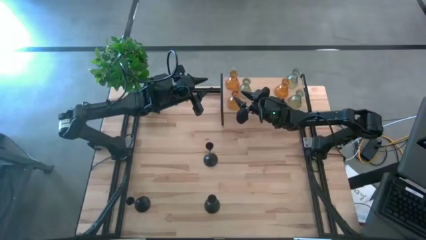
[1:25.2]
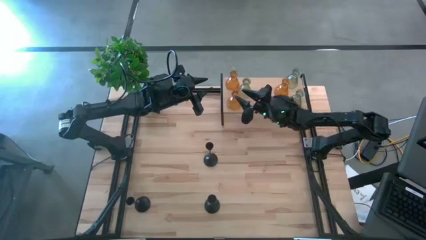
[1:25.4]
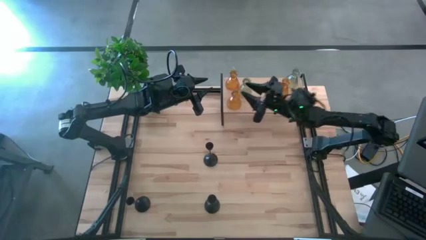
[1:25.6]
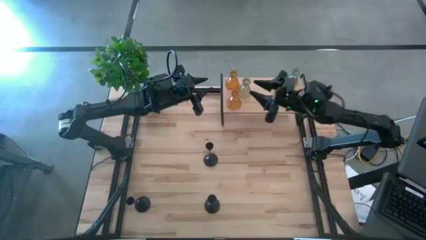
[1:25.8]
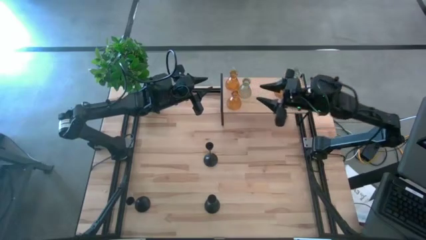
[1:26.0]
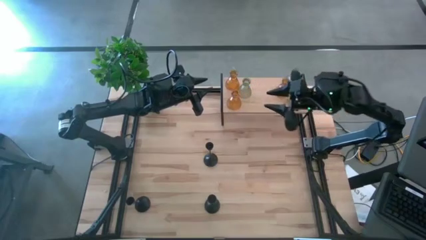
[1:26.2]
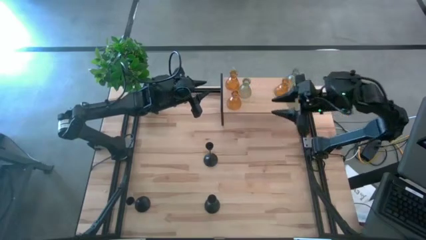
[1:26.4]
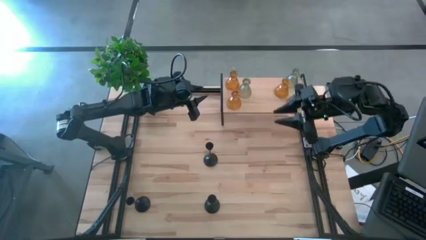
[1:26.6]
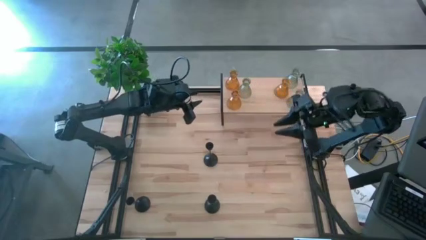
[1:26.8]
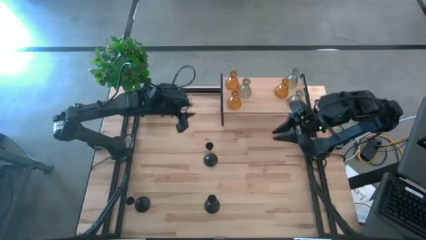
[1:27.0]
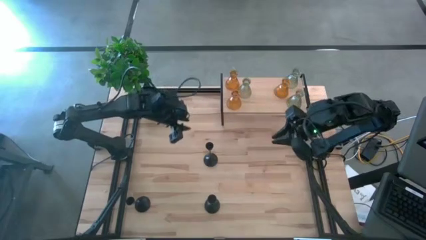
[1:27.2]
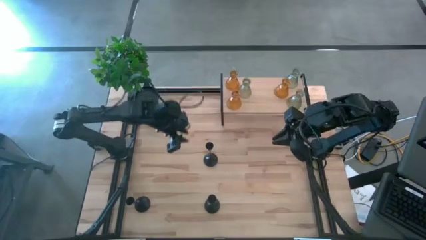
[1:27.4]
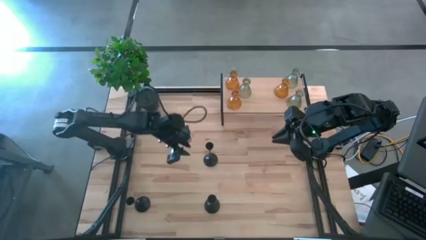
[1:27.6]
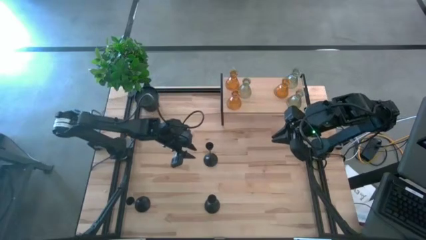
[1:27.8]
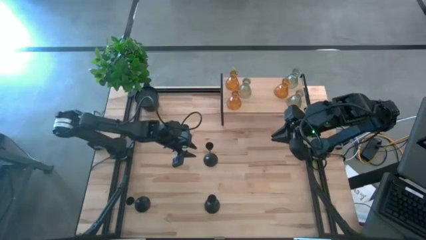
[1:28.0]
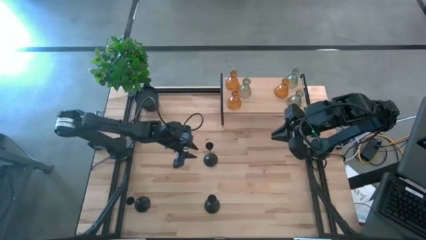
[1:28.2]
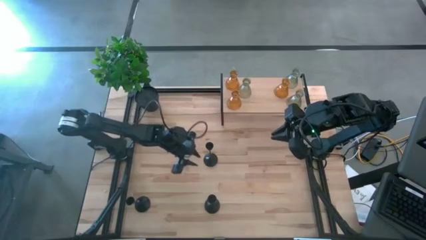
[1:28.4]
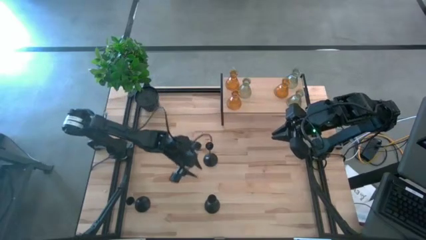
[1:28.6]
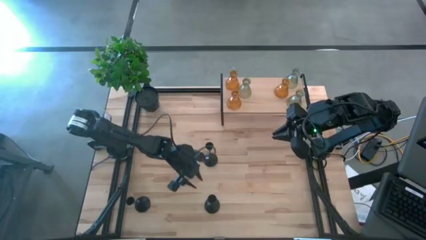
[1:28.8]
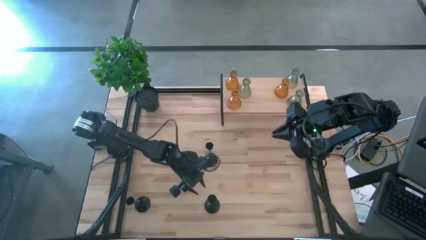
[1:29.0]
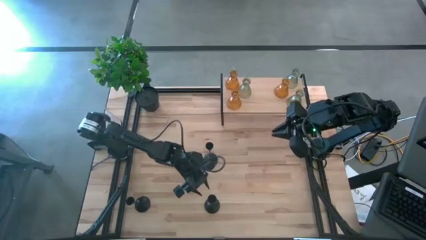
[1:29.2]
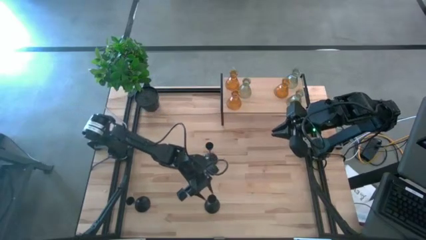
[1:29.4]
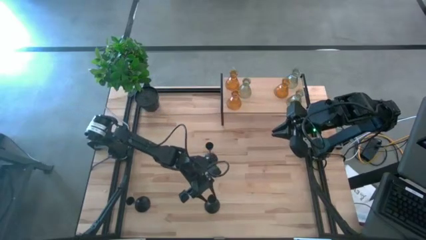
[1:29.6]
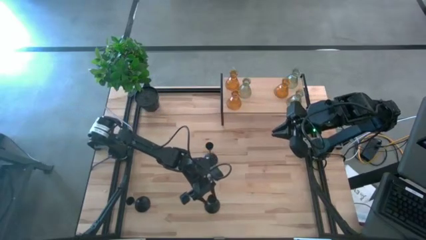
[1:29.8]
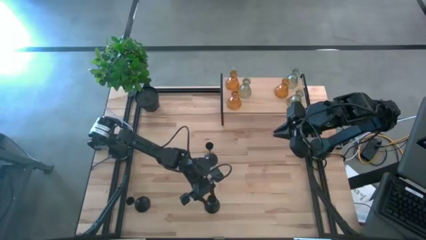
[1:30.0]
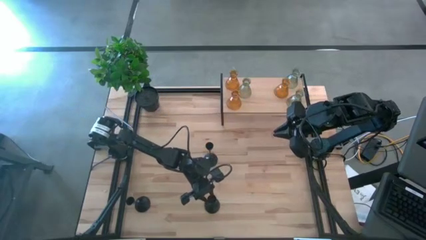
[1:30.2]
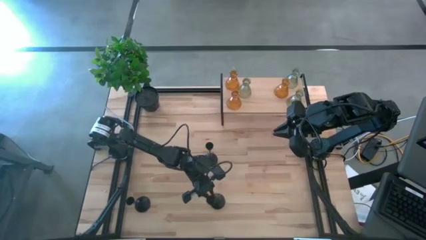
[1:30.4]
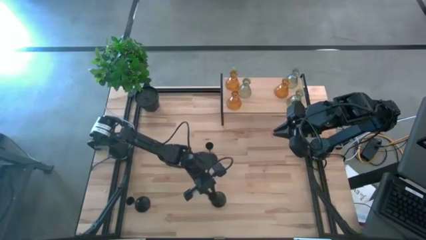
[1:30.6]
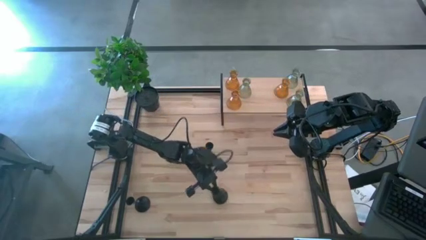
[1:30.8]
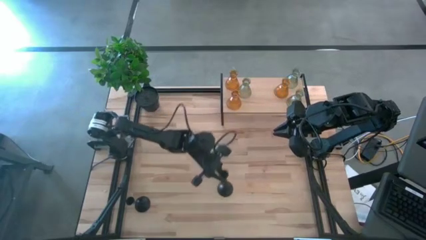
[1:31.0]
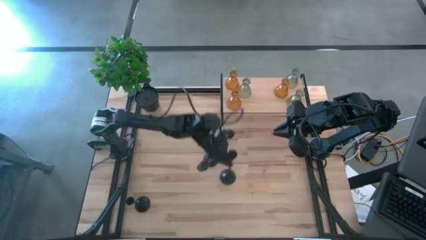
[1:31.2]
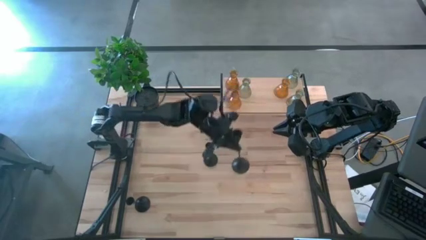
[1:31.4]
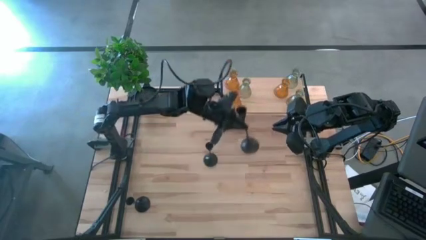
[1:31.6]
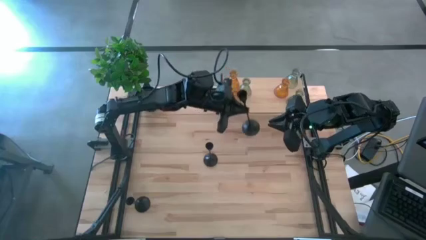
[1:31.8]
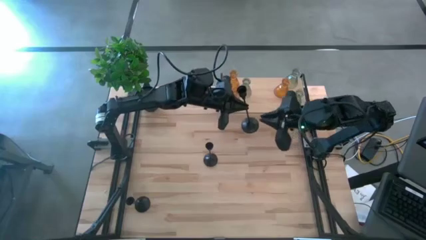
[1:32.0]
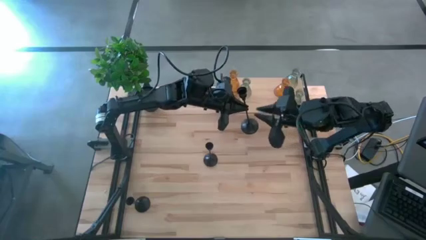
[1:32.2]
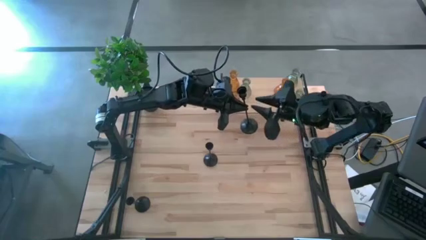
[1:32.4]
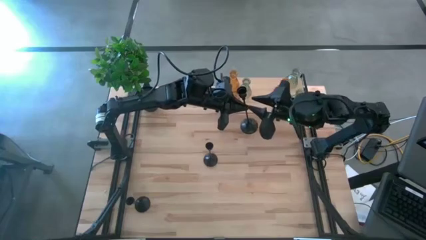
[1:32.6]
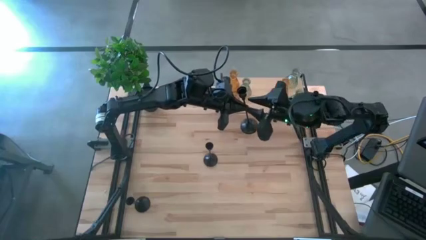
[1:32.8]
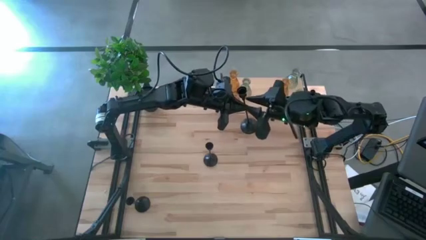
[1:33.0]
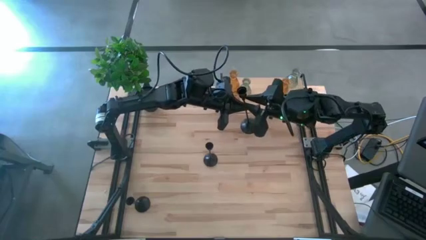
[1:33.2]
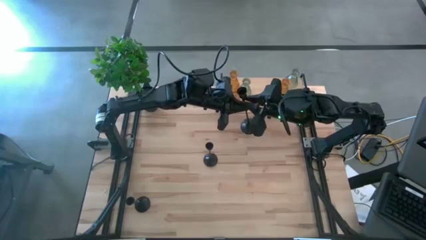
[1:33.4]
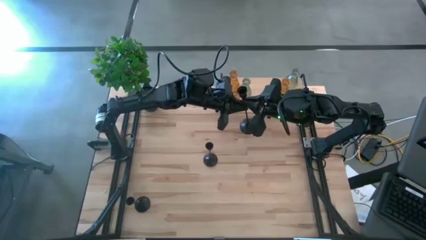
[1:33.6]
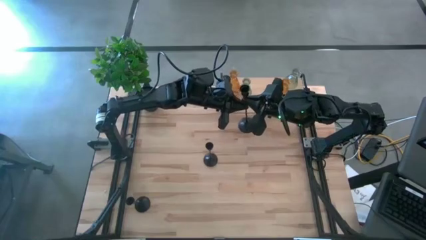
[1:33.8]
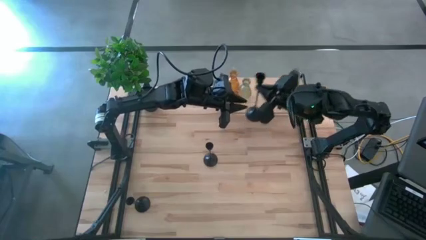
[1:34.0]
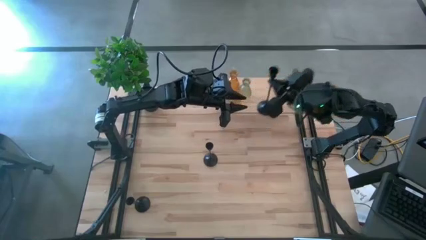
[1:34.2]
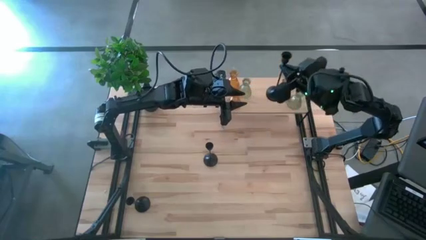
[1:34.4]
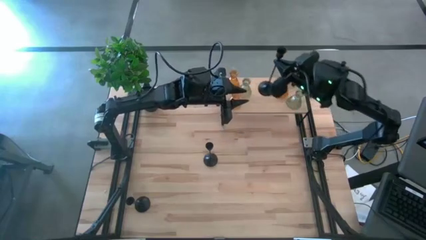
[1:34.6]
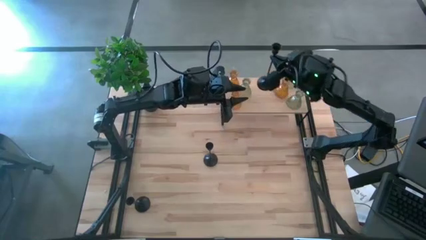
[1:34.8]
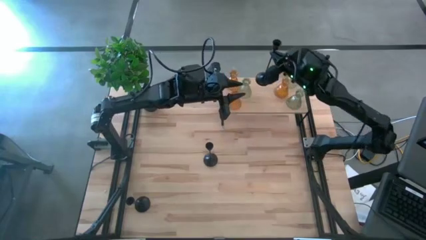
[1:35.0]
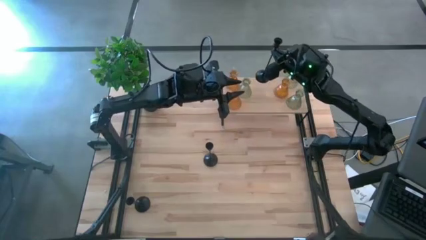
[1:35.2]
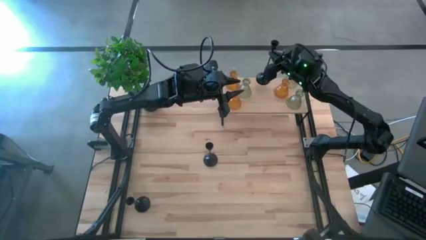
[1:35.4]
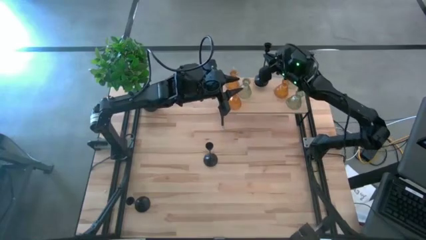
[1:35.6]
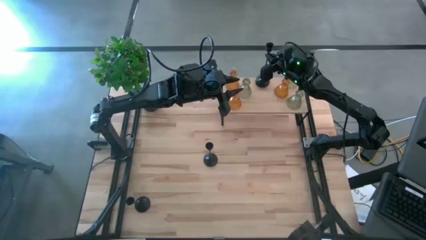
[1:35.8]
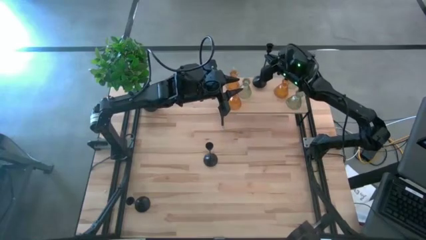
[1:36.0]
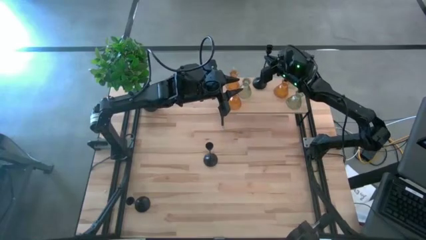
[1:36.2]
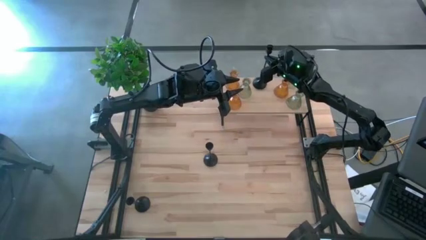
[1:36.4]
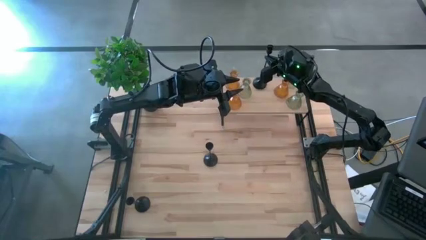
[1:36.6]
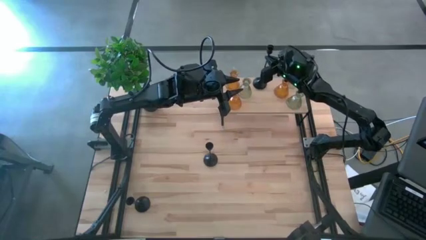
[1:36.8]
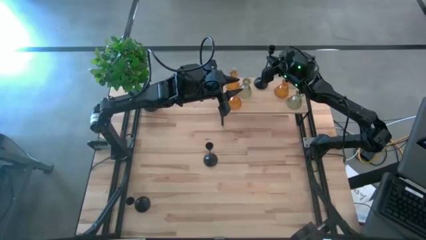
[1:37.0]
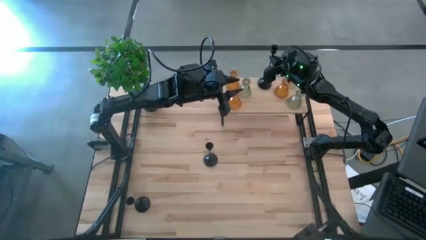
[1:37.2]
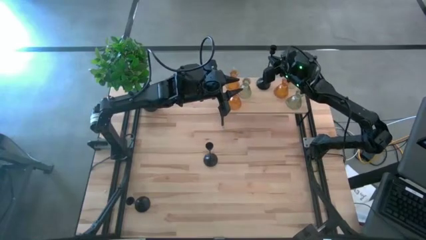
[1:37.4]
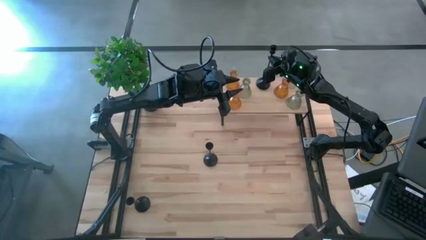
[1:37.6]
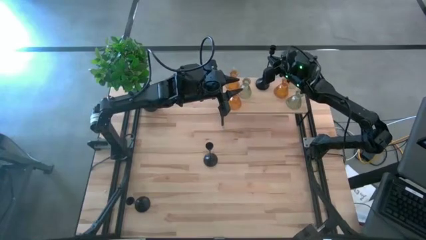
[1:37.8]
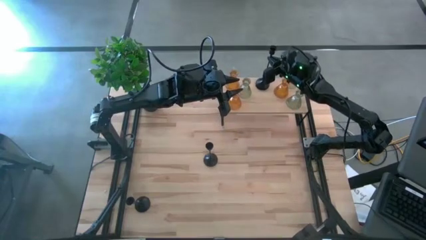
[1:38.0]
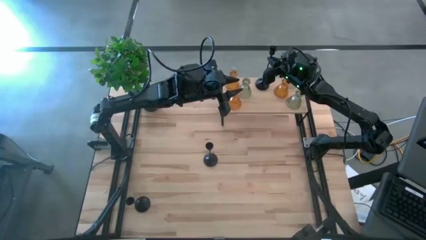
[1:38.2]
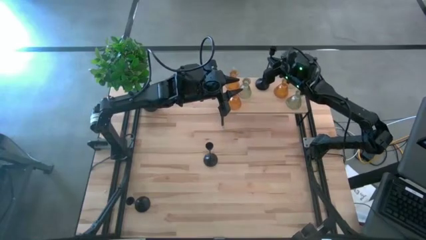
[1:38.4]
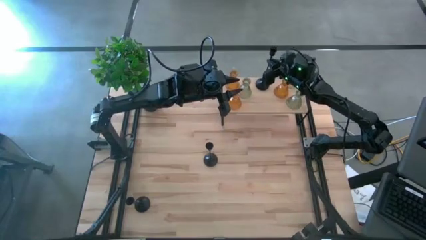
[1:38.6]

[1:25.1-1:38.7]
Task: Pick & Place candle stick holders
Put the bottom right black candle holder on the shelf

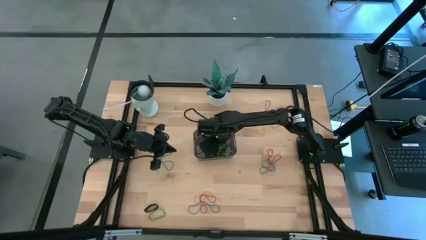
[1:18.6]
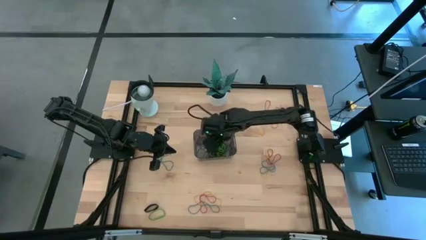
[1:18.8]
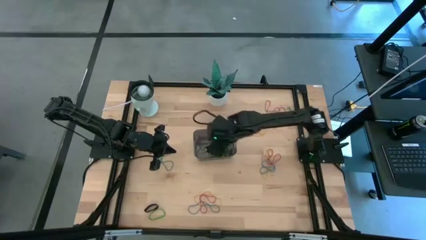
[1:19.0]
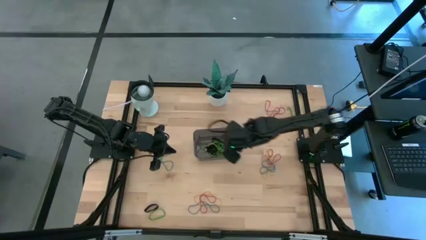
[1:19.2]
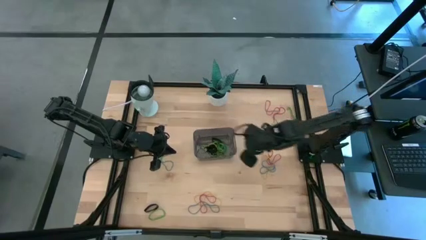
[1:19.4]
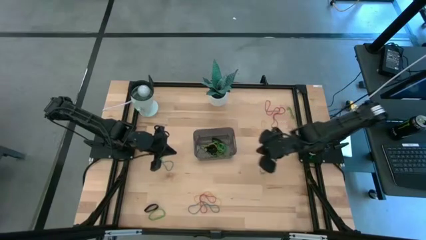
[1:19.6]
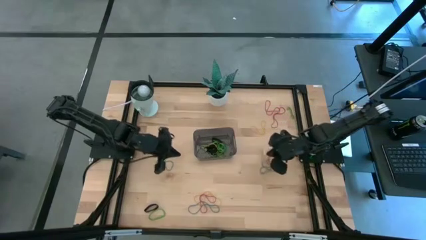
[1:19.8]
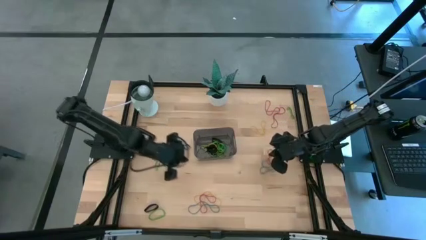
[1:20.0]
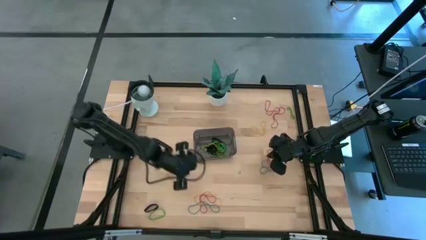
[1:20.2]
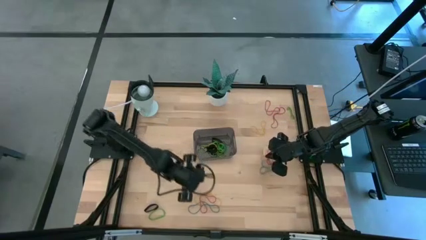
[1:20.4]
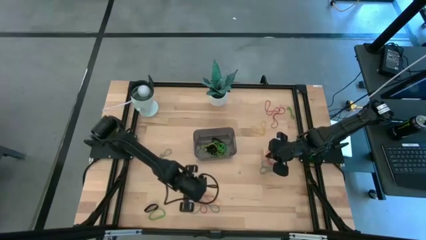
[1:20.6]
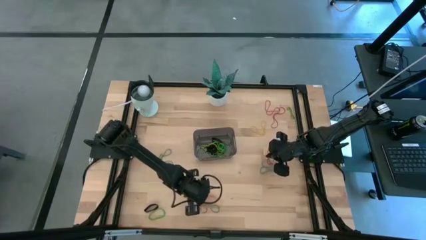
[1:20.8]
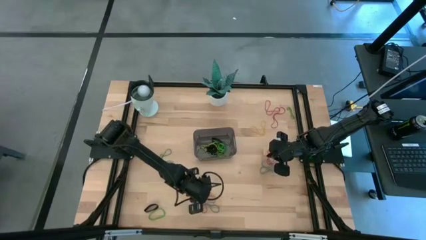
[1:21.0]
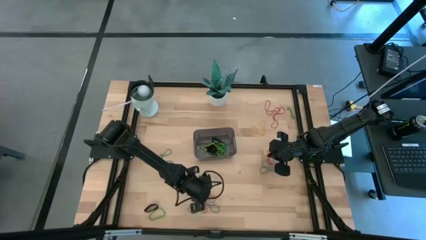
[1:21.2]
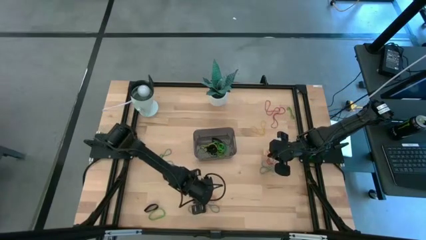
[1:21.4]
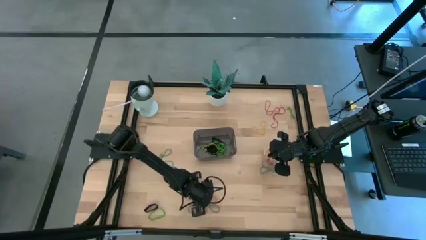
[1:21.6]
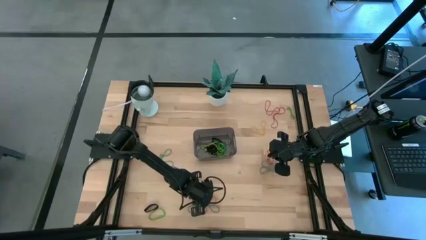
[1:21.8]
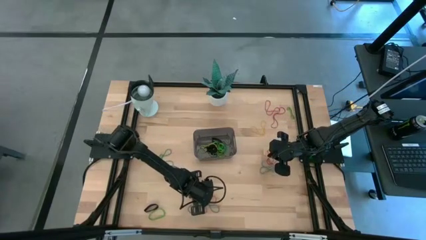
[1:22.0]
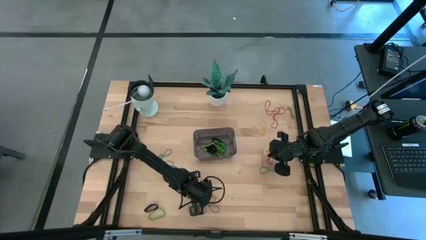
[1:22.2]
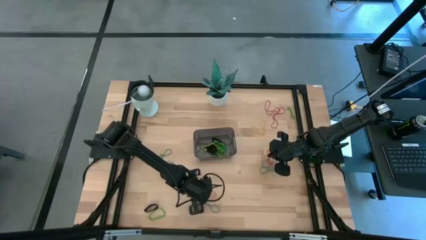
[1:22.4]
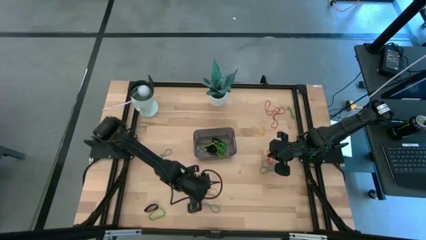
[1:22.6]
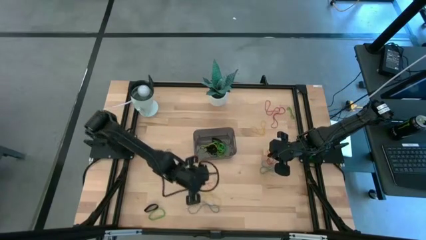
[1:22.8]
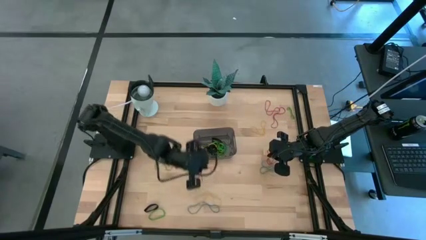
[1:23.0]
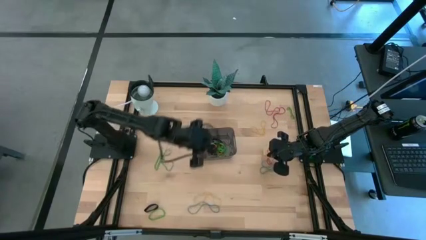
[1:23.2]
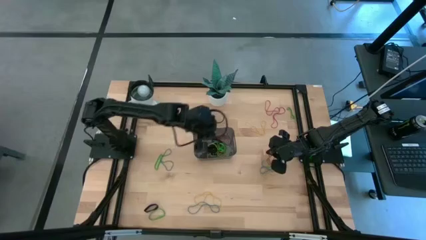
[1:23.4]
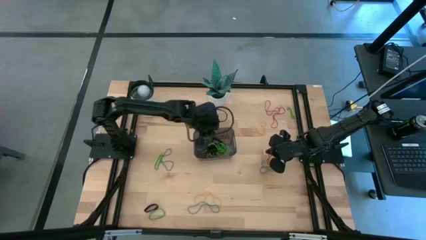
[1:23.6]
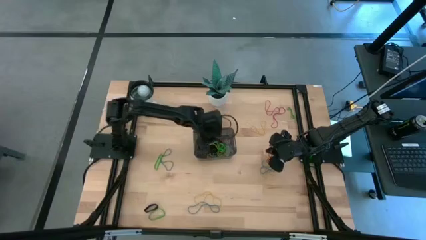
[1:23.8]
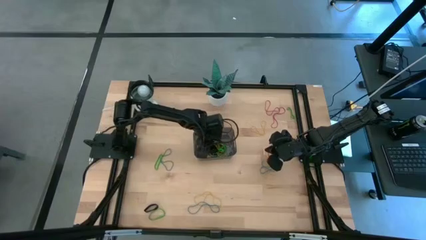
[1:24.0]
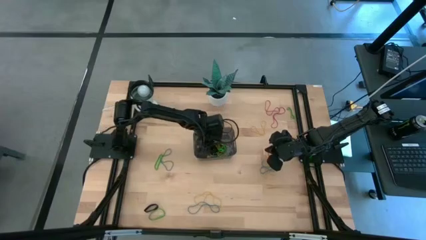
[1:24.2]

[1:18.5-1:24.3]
Task: Pick and place rubber bands into bin
Put the red rubber band into the black bin
